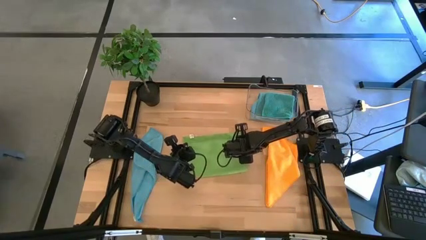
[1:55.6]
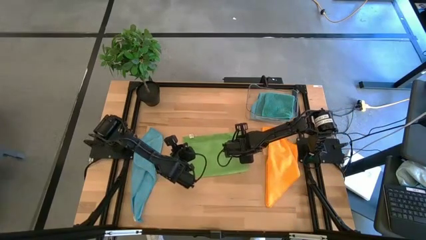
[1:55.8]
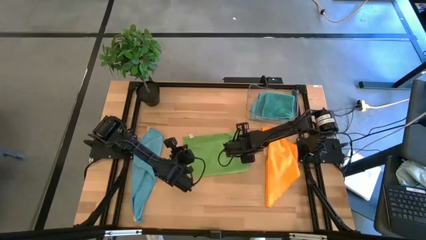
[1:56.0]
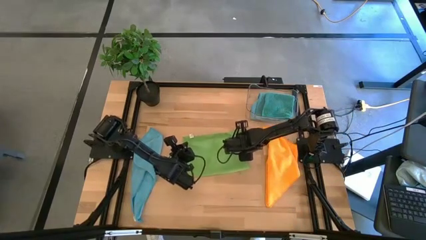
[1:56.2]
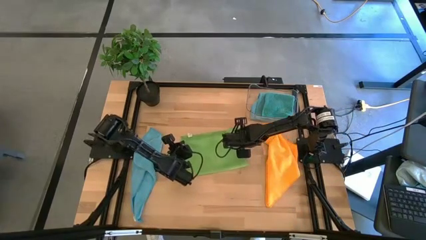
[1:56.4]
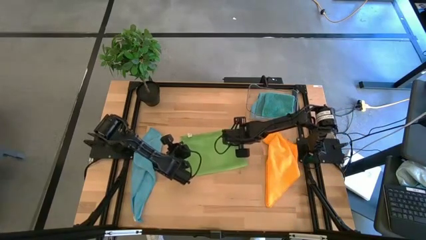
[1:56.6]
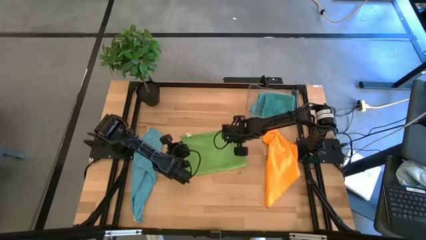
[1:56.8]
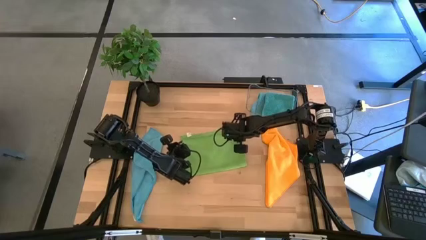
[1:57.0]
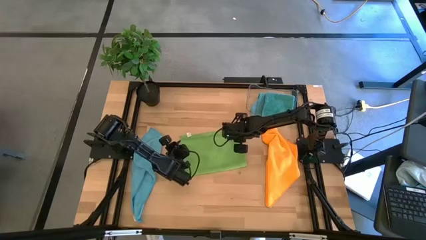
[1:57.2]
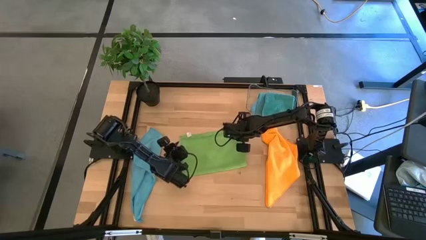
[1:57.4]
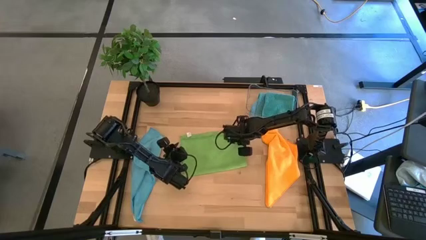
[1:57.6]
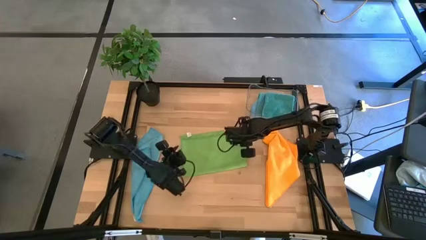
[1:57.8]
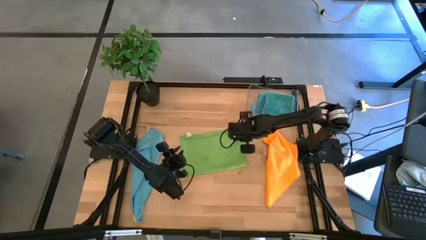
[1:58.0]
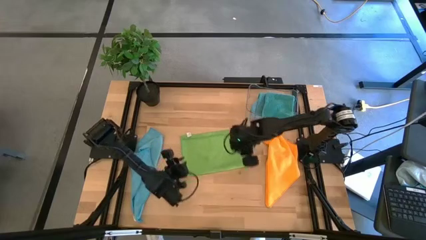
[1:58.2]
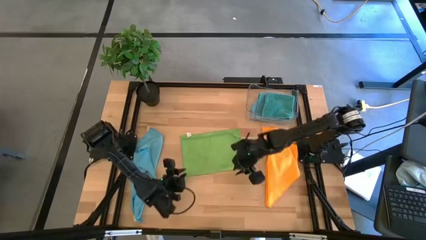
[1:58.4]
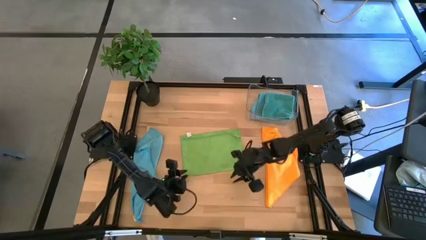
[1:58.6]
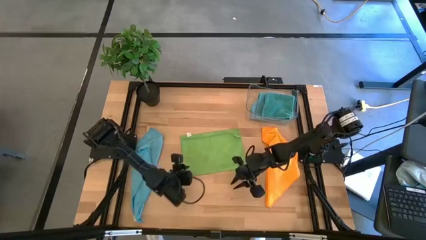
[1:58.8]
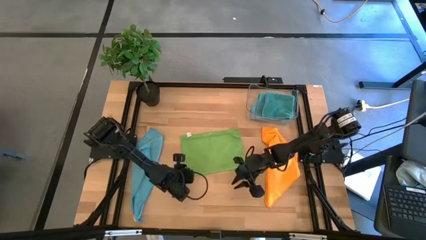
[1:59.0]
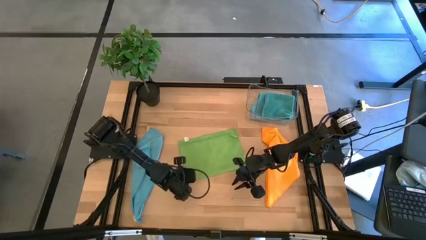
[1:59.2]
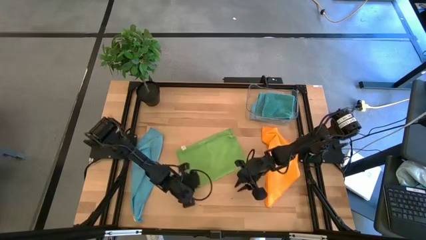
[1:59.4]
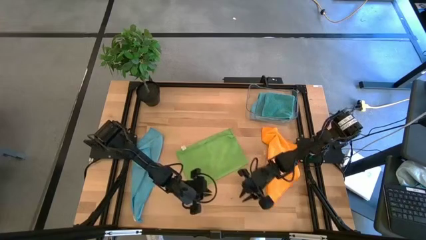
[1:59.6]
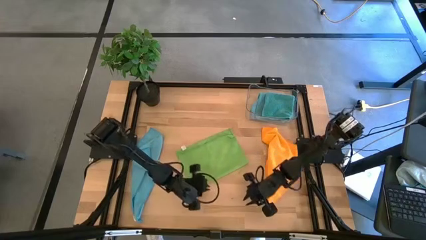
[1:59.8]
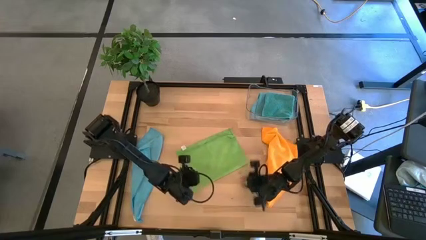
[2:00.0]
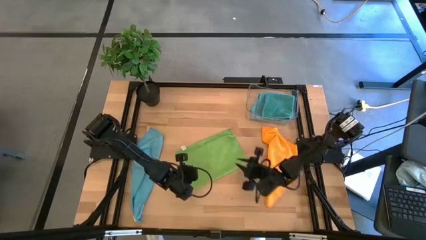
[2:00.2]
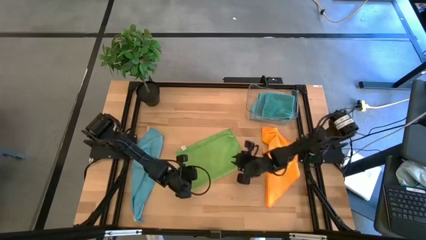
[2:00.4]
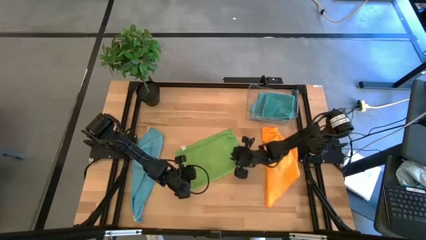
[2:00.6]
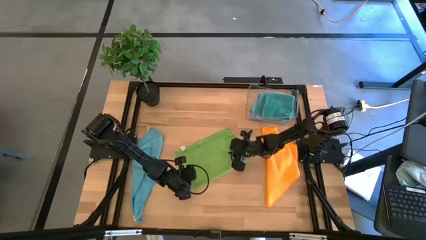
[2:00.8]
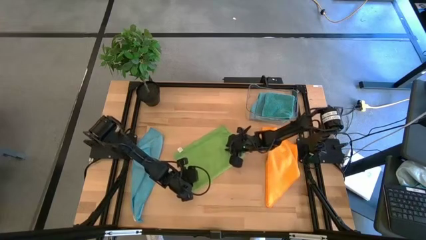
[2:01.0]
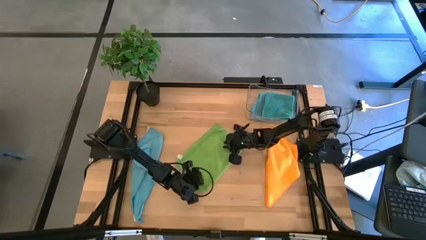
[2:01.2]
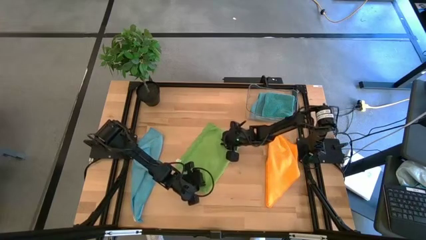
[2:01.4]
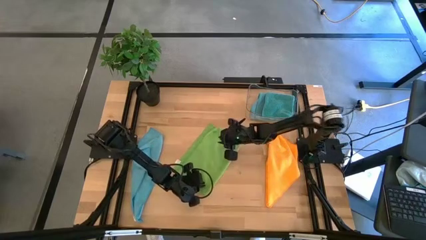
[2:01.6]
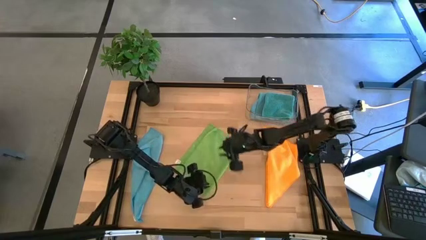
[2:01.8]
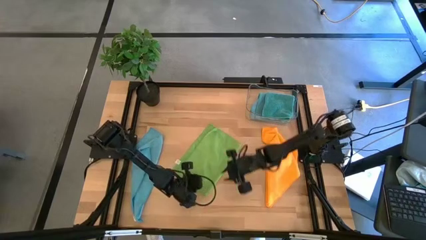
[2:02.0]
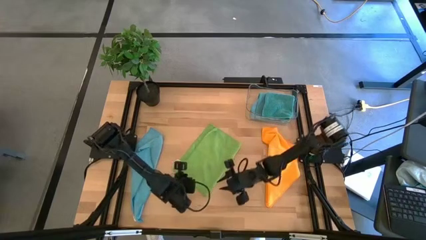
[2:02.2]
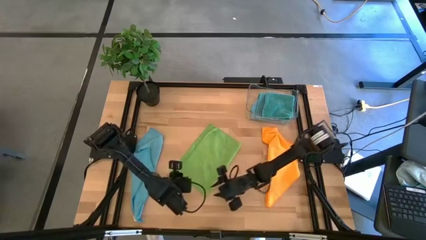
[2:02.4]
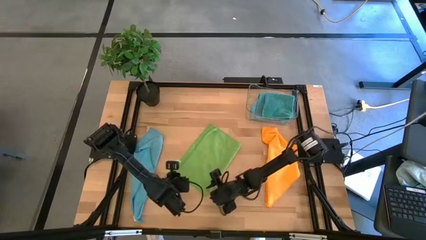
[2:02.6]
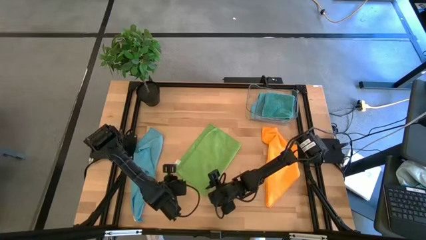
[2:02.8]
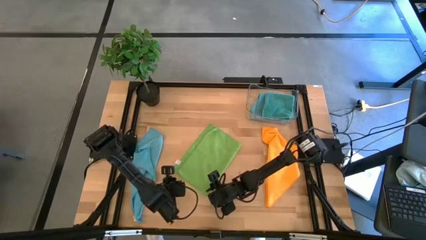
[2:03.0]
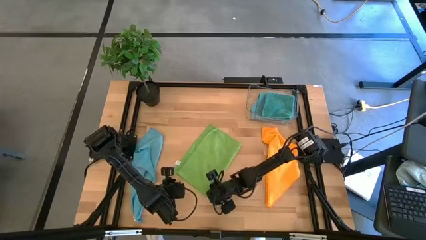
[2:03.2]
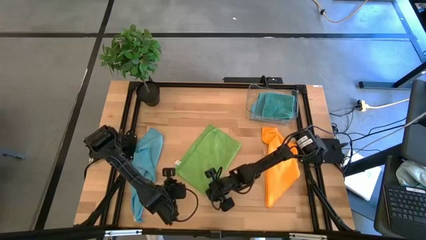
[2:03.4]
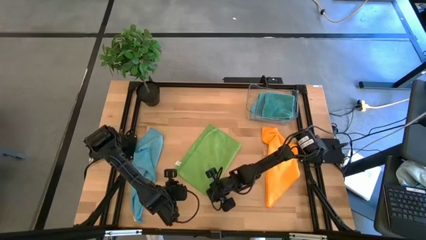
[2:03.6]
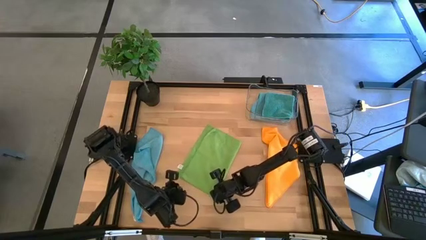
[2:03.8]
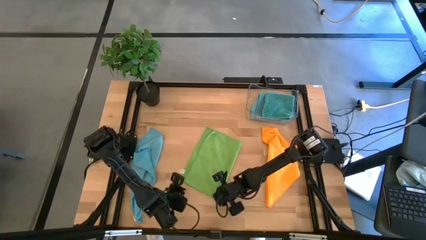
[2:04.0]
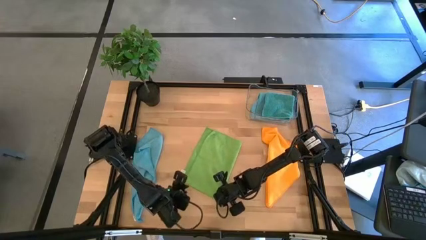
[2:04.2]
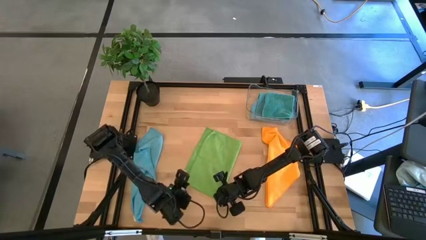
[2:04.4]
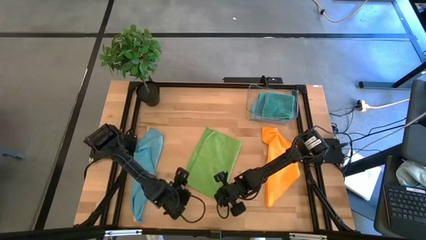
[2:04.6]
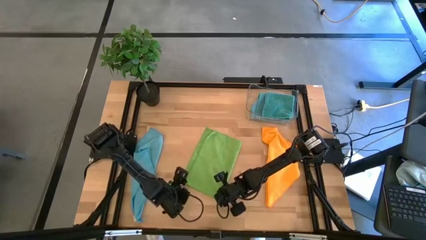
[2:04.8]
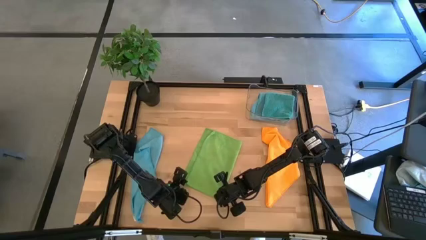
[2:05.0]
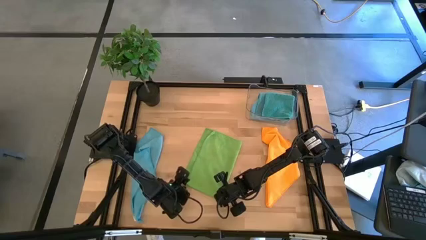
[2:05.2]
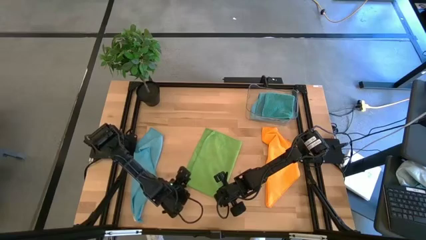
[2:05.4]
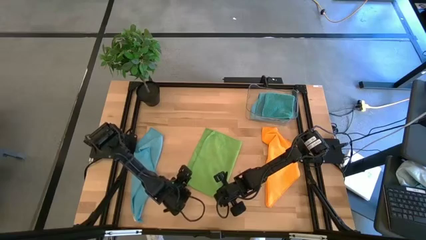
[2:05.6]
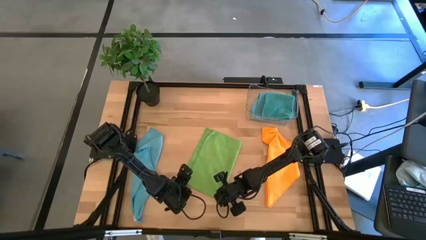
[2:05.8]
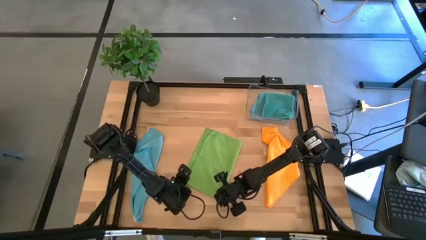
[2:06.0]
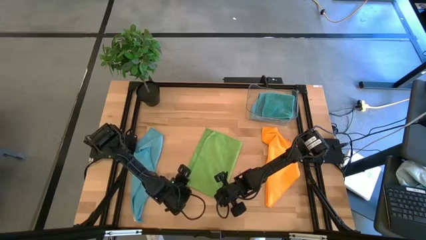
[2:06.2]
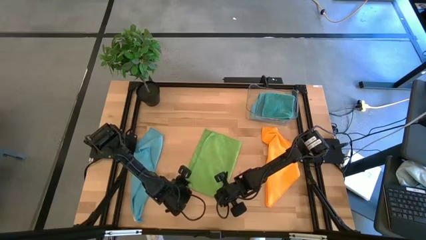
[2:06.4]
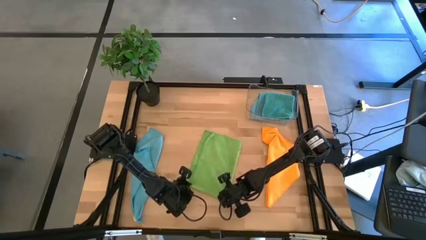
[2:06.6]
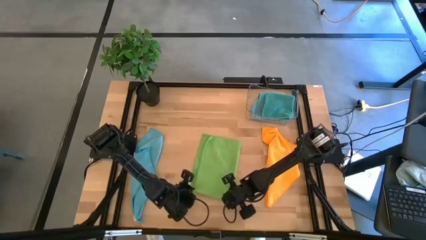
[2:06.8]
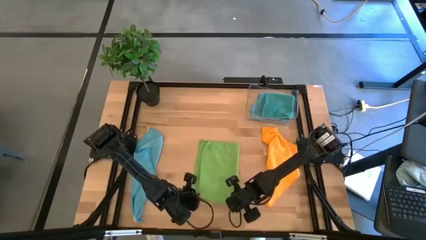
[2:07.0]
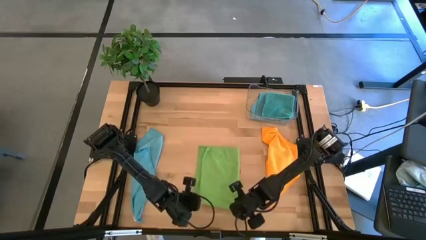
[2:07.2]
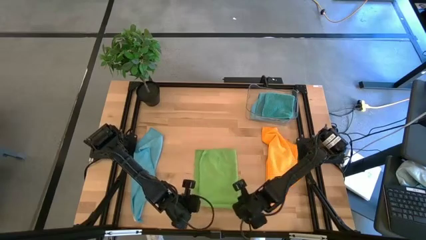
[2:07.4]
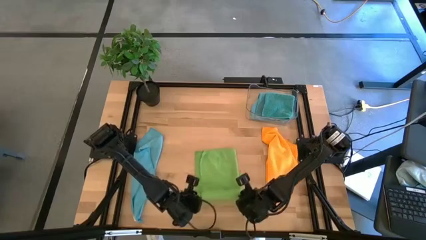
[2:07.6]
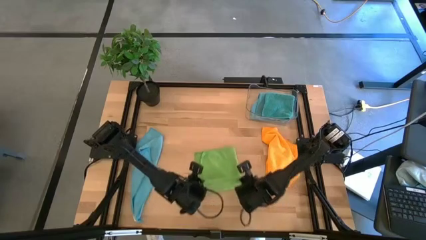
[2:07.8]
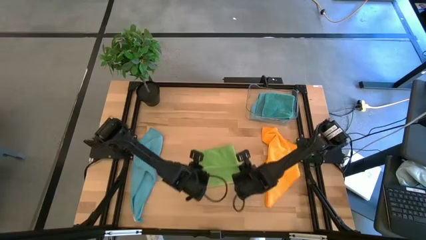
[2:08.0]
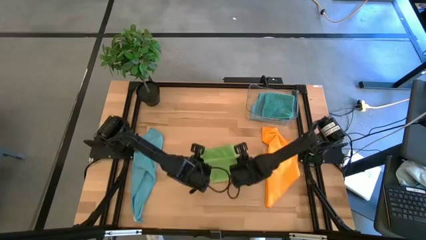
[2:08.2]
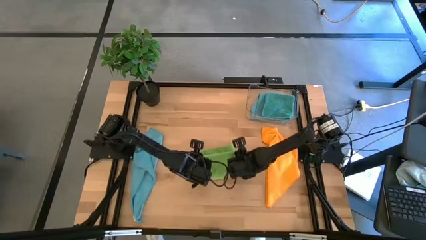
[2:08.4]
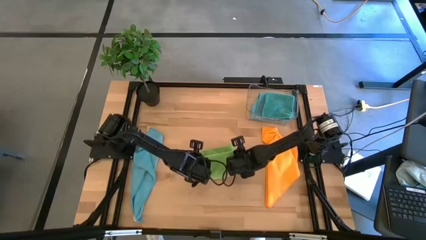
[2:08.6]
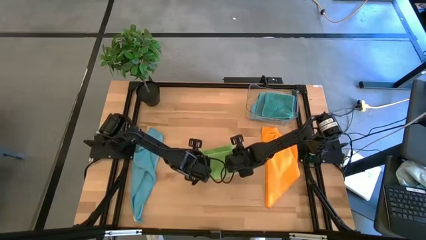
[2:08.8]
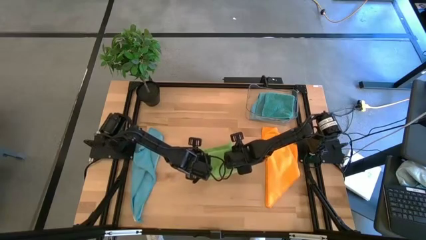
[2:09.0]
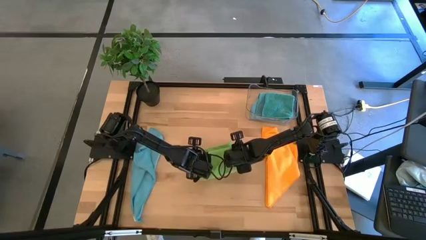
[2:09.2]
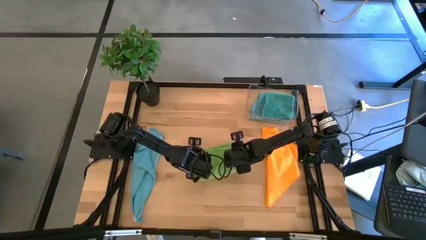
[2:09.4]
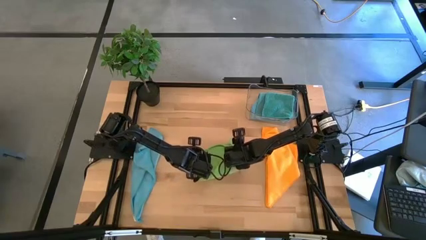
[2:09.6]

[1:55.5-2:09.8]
Task: Fold microfiber towels
Fold the green microfiber towel

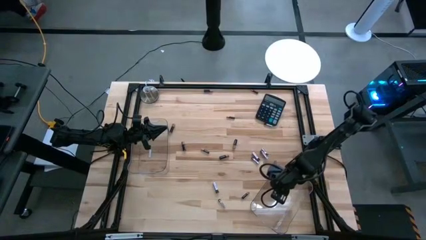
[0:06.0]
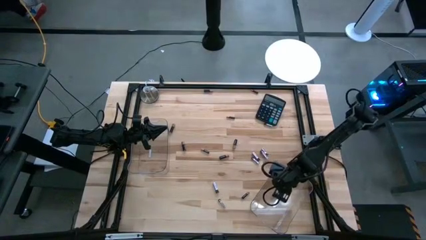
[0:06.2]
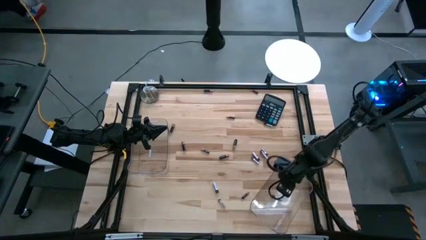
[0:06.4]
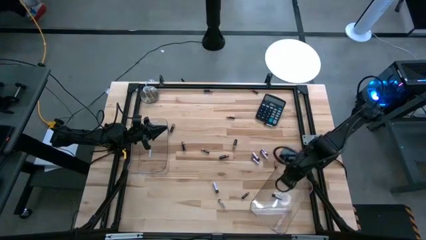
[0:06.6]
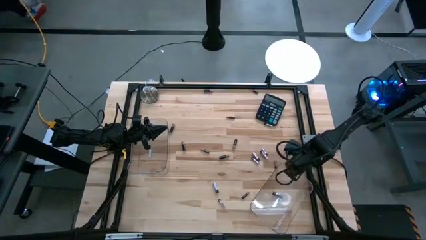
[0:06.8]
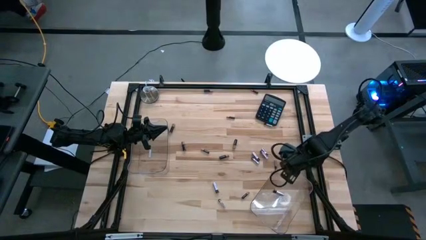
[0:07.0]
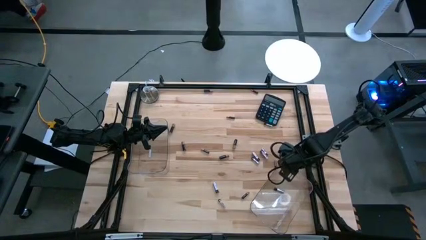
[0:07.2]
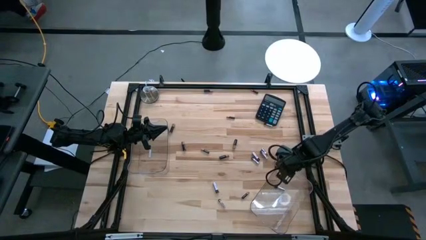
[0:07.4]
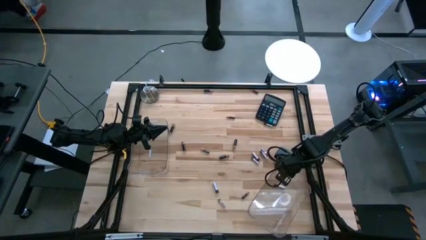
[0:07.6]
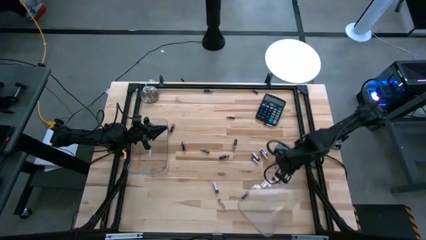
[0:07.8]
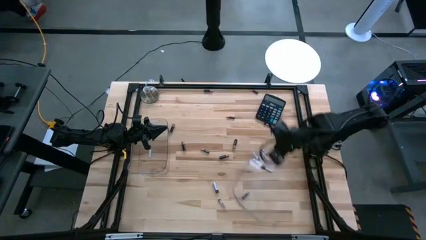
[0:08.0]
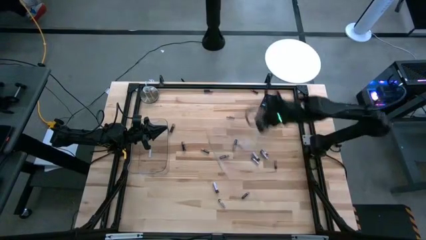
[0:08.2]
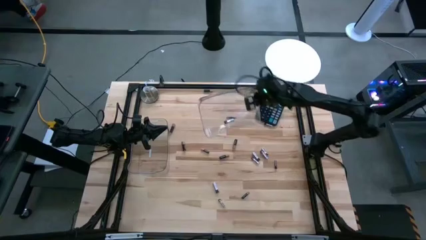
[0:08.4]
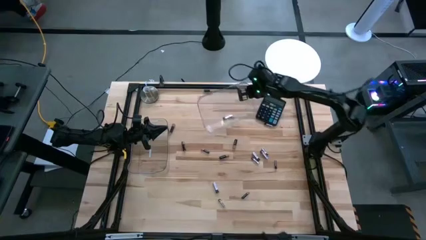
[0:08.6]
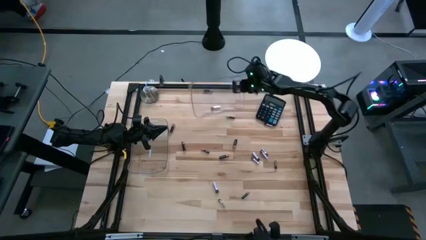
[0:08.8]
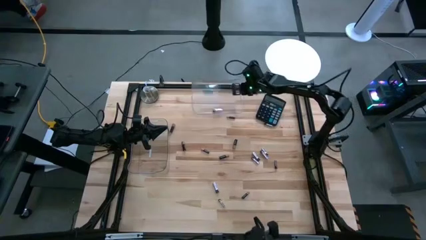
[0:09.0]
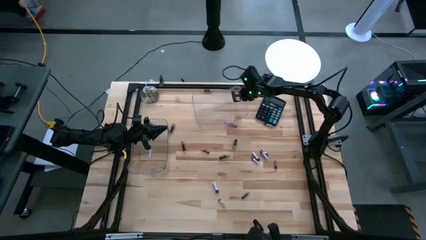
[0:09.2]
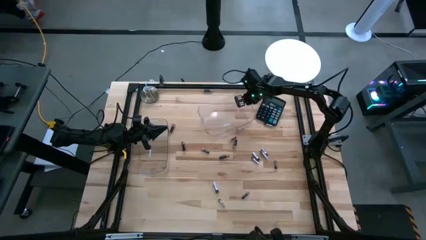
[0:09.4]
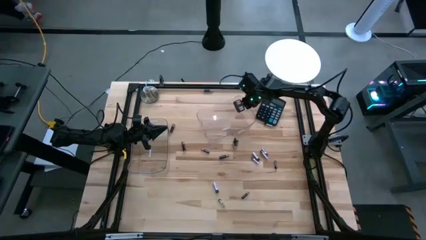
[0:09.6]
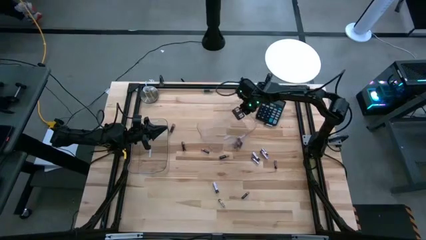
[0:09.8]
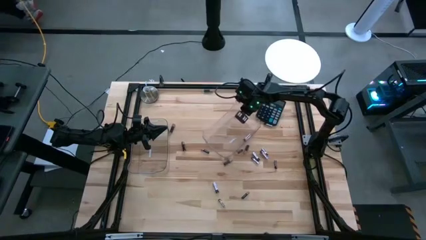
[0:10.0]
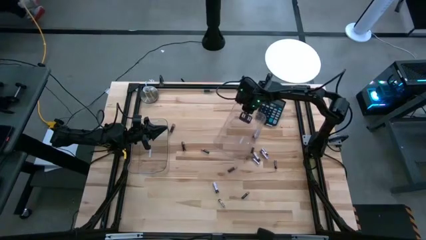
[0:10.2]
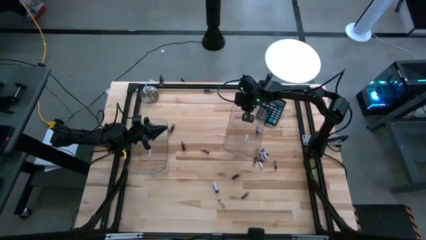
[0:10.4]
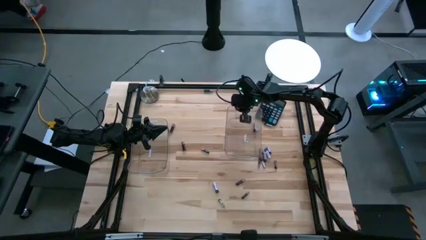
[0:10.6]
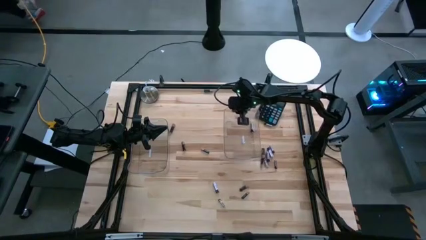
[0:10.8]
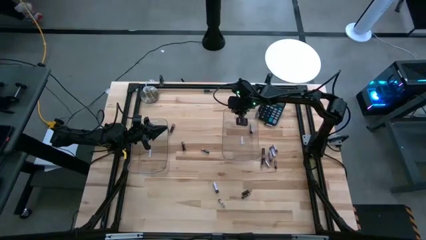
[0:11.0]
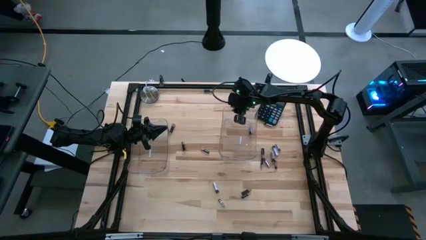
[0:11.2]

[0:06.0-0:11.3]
Task: Sort batteries
Move the right transparent bin to the center of the table
